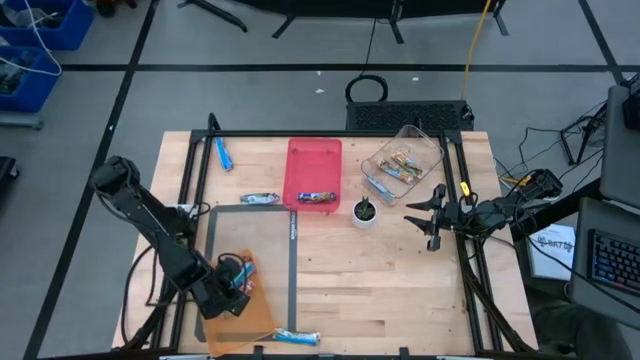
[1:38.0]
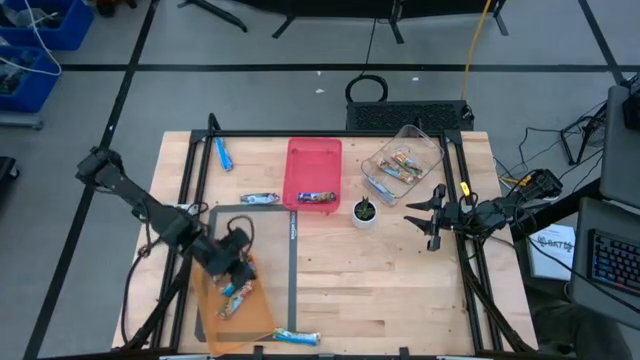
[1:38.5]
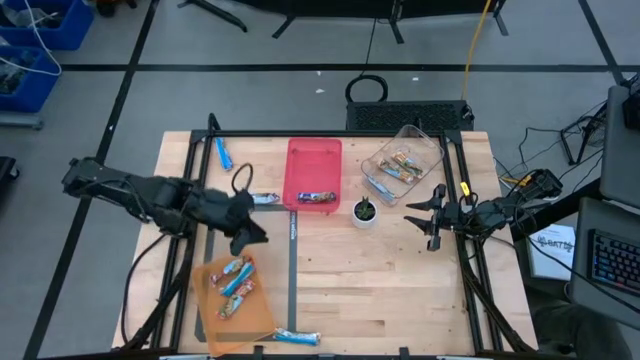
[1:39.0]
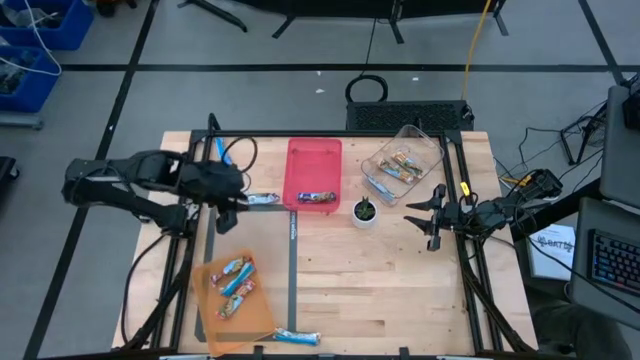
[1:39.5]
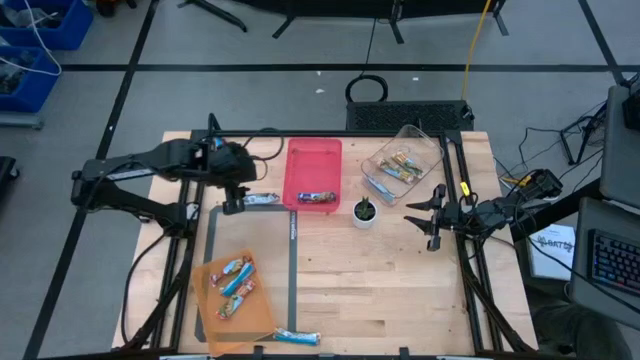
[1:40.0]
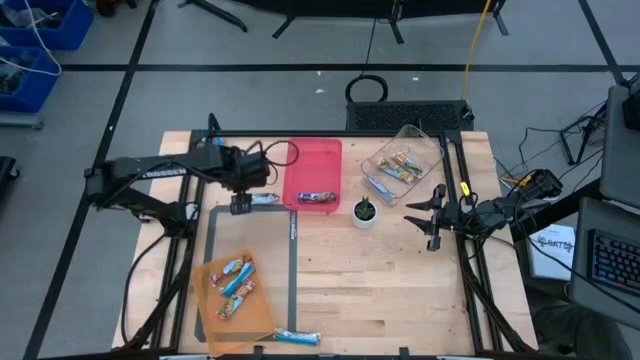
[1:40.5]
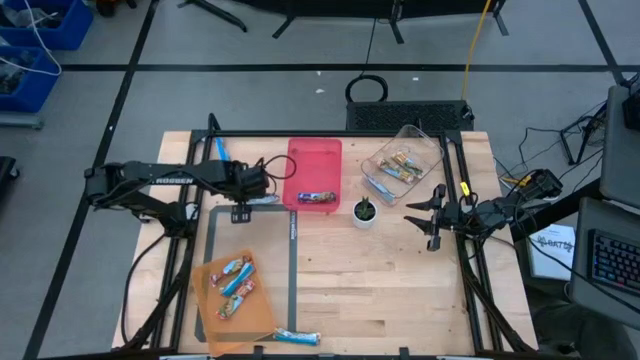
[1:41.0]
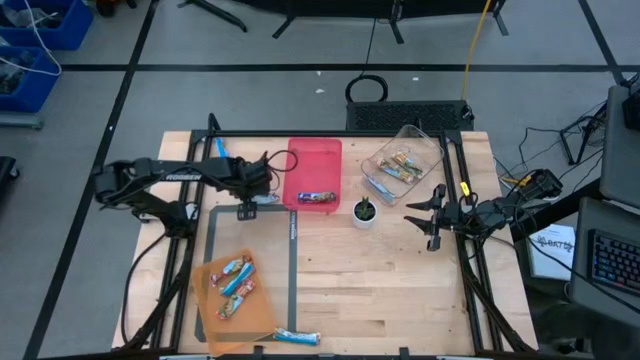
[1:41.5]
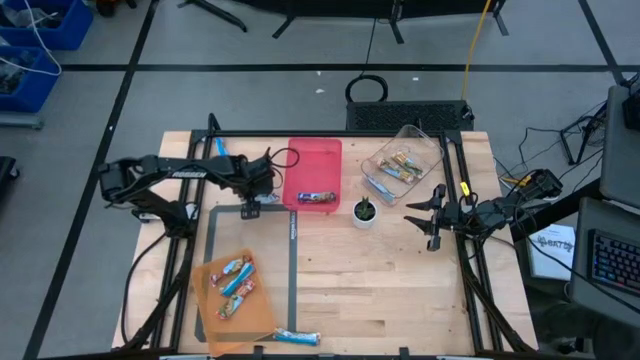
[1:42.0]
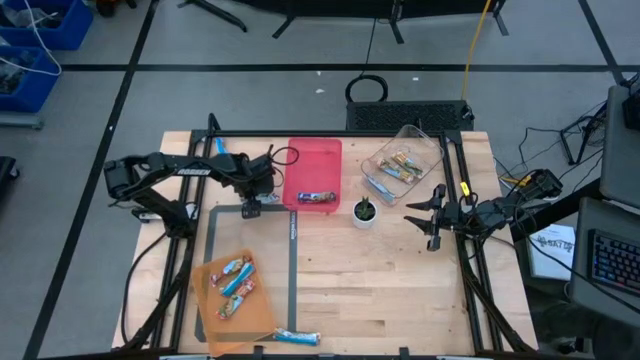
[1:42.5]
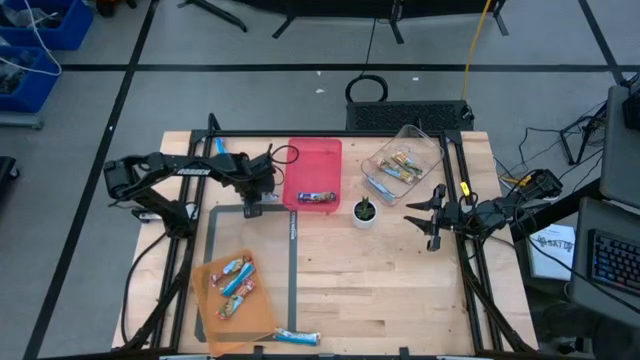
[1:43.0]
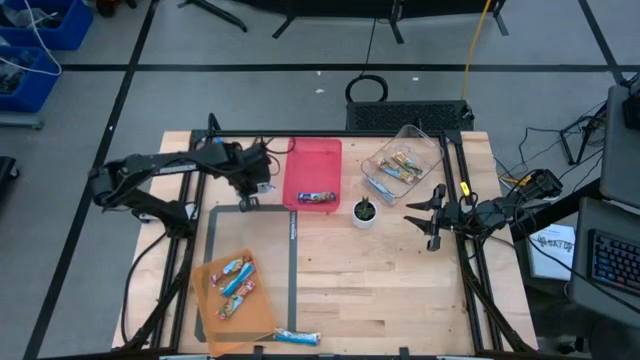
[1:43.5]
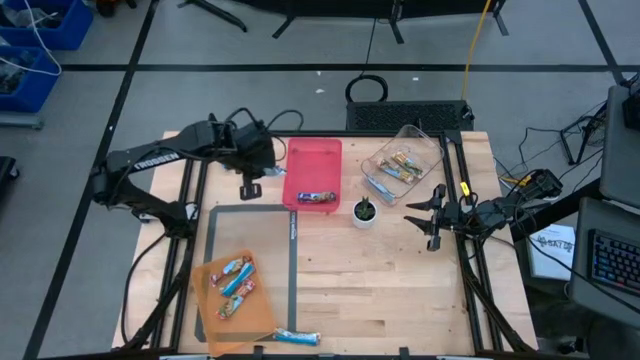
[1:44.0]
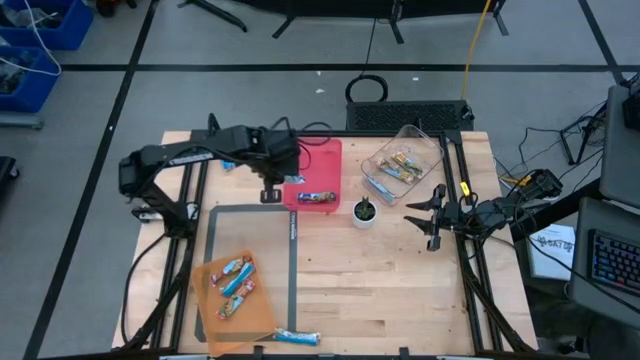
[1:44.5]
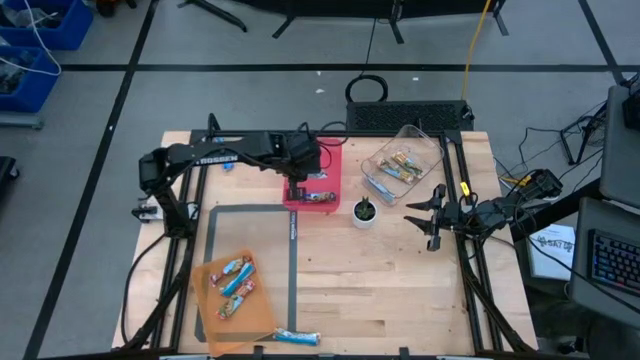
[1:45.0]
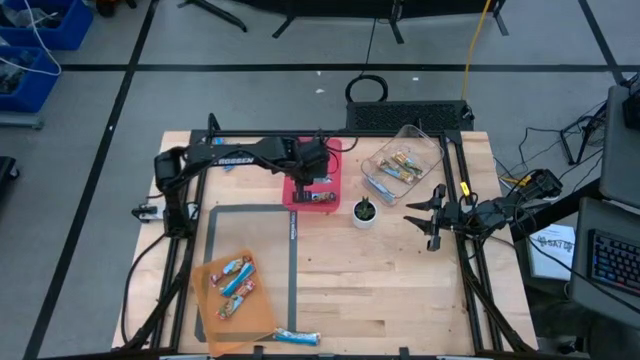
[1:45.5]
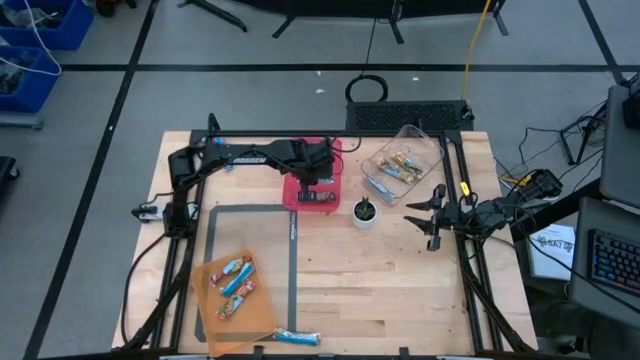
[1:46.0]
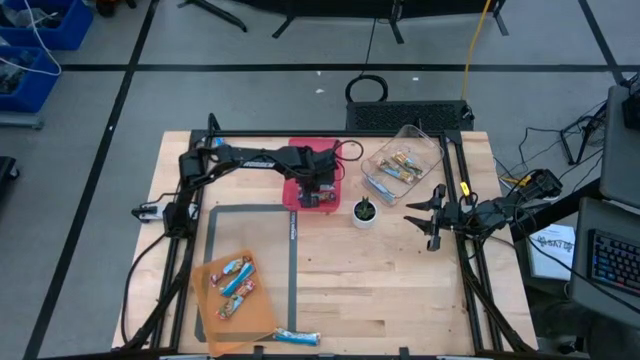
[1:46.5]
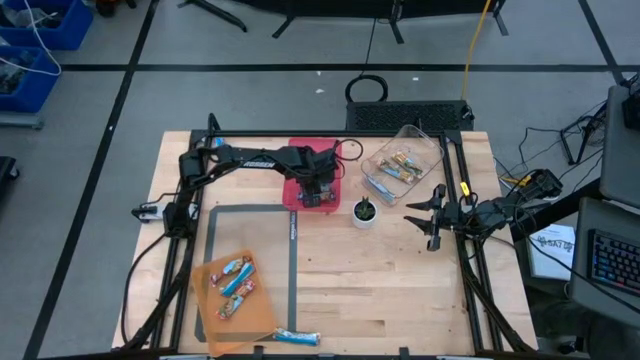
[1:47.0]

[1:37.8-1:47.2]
Task: Pick and place Granola Bars by type
Put the blue granola bar into the red bin

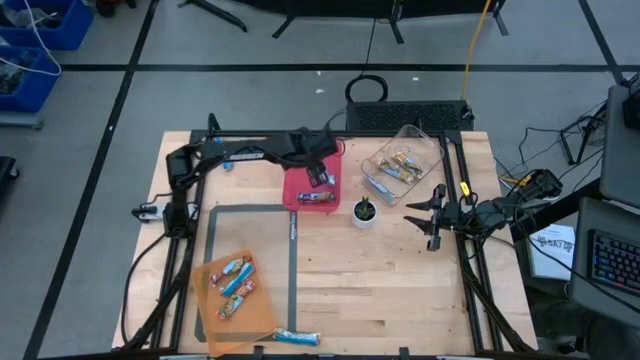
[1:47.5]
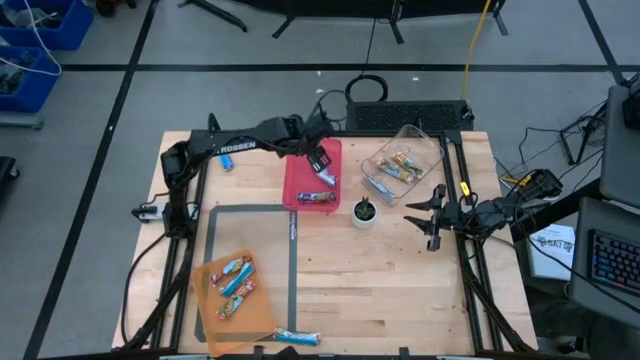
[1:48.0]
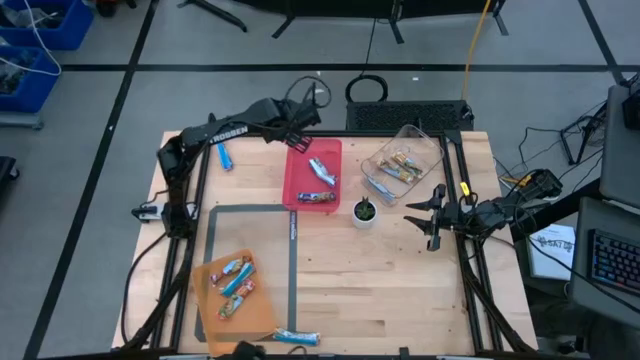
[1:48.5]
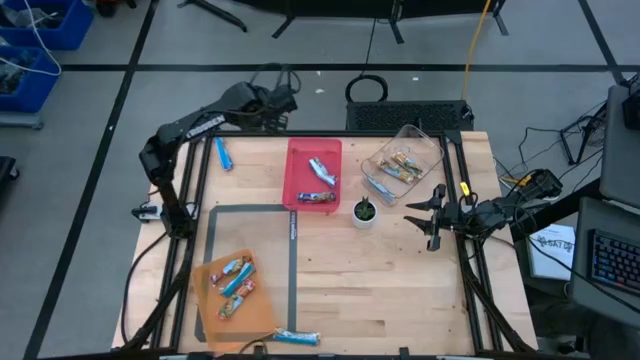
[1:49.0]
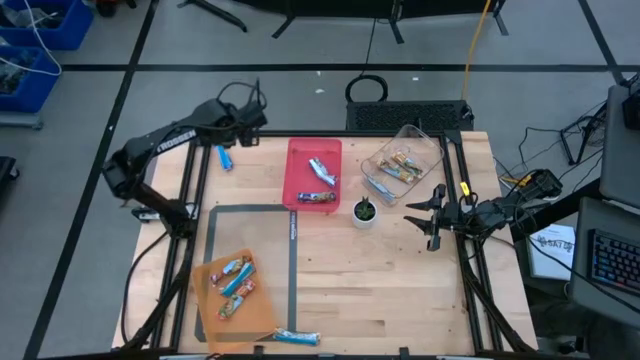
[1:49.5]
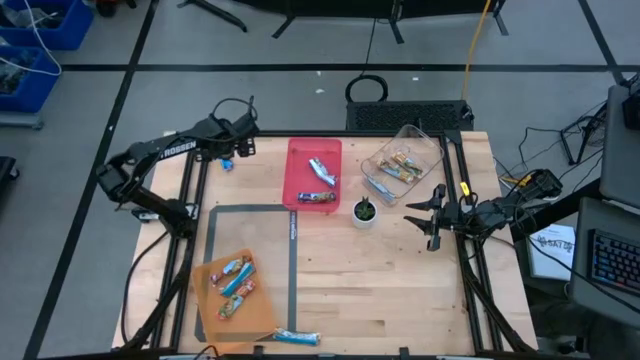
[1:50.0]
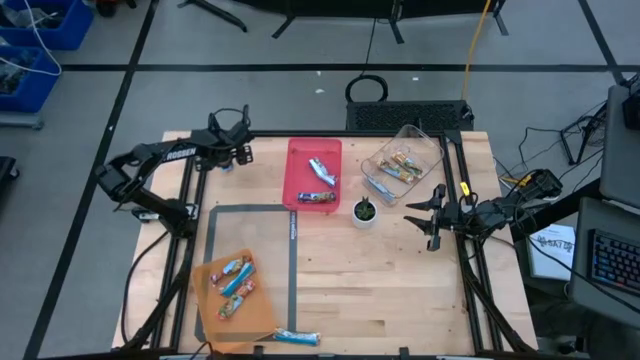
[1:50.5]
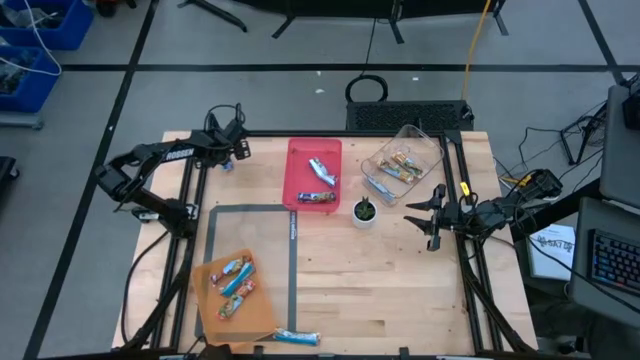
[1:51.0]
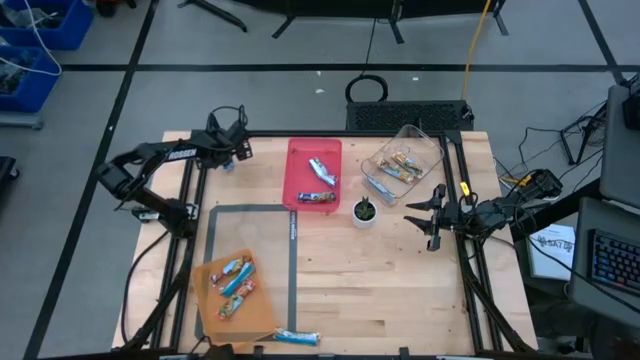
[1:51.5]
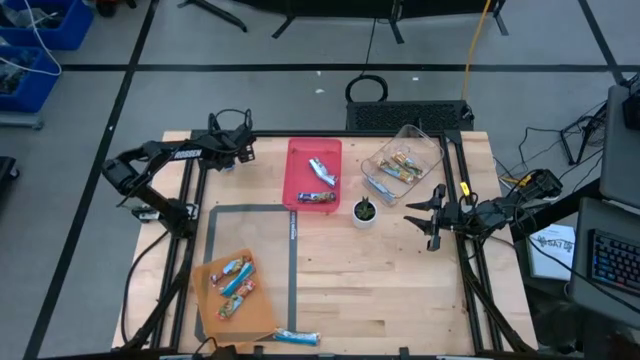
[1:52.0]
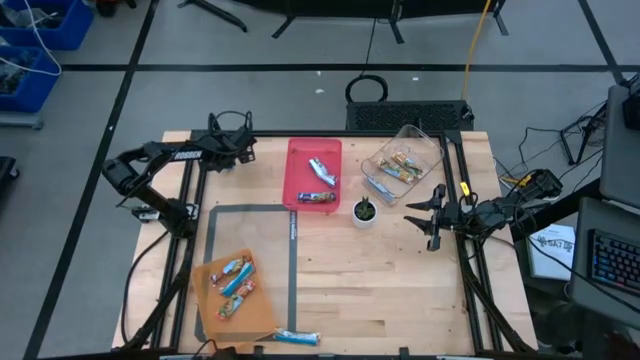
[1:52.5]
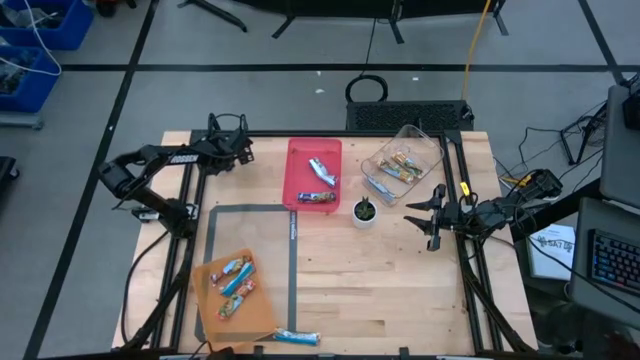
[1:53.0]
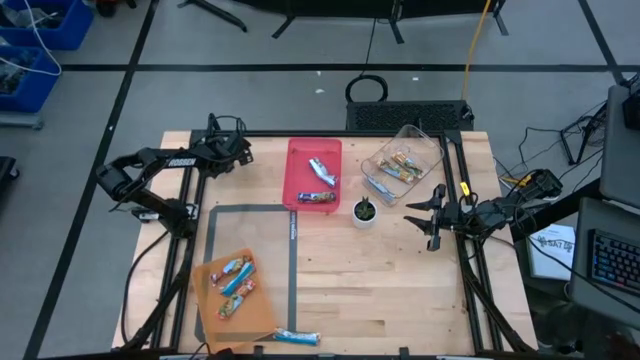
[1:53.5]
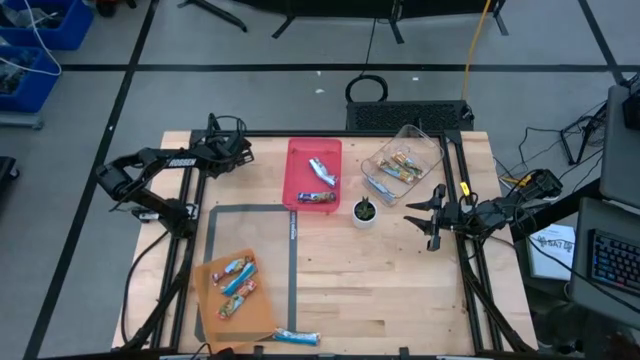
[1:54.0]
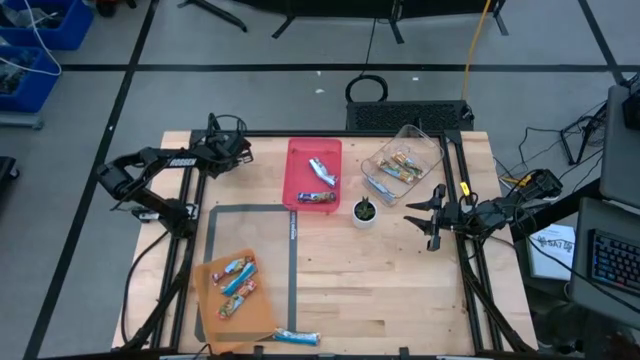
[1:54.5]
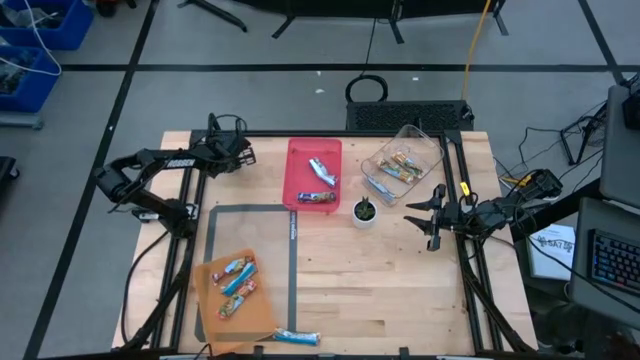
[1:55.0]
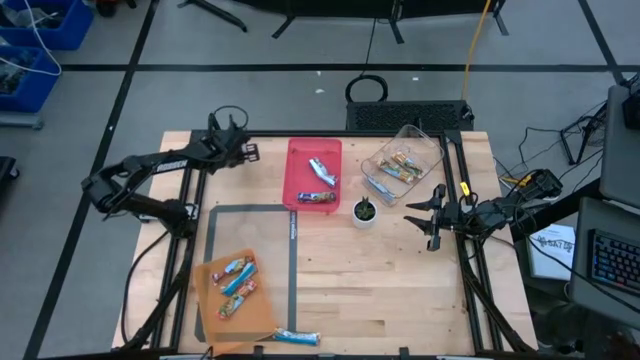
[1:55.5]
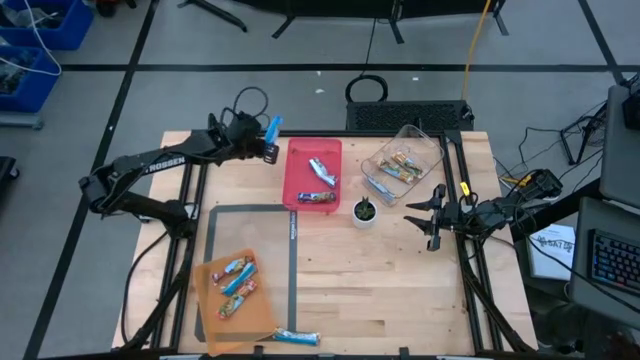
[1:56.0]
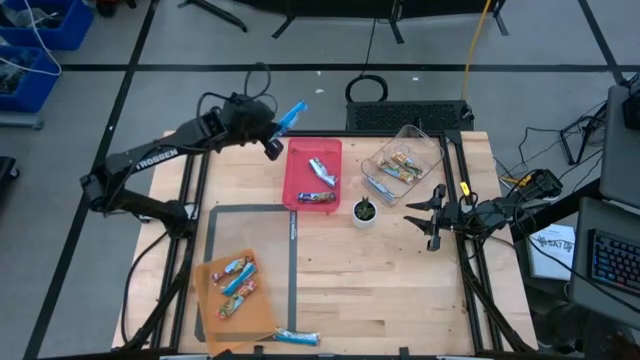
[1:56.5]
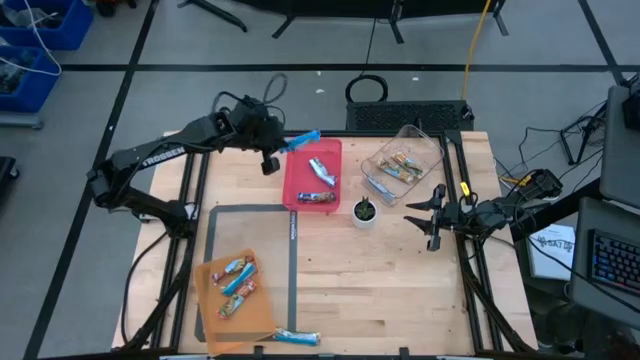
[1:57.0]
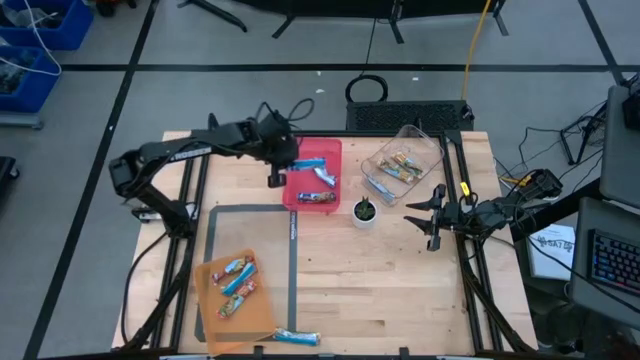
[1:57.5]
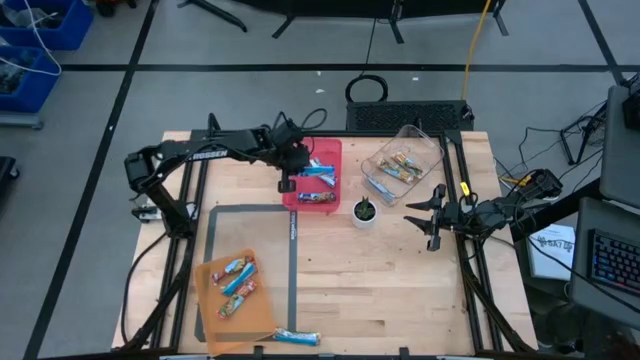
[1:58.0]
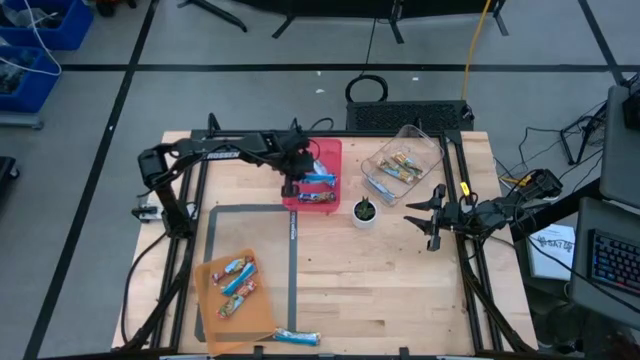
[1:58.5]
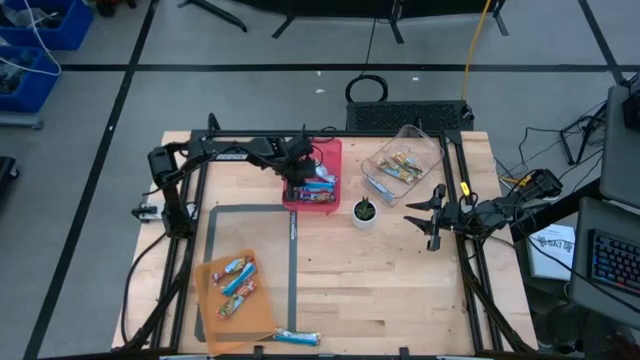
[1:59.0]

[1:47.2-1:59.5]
Put the blue granola bar into the red bin
